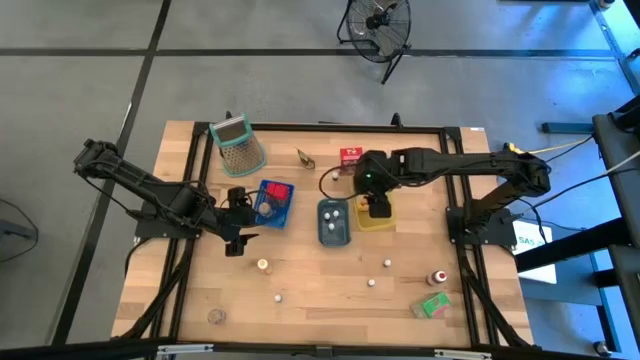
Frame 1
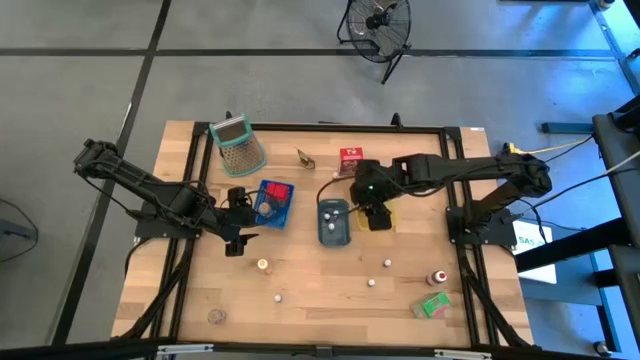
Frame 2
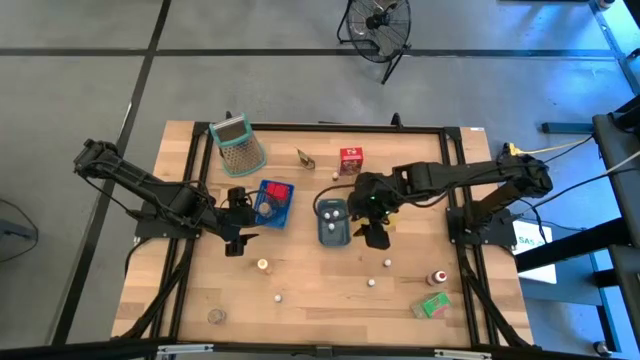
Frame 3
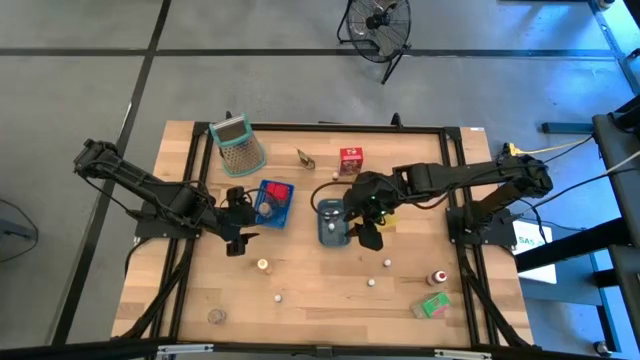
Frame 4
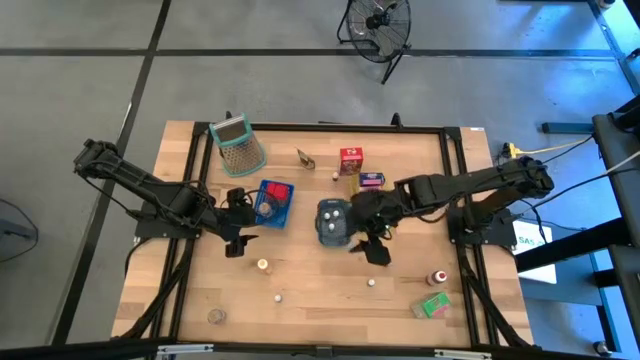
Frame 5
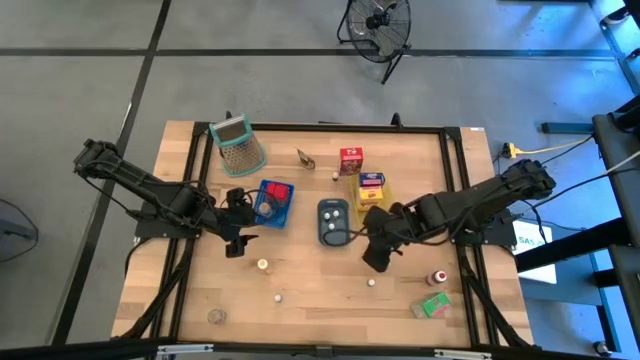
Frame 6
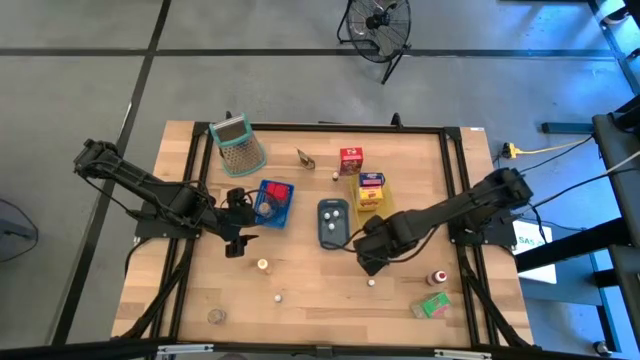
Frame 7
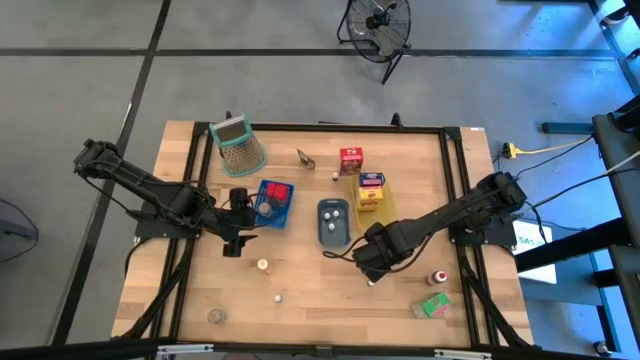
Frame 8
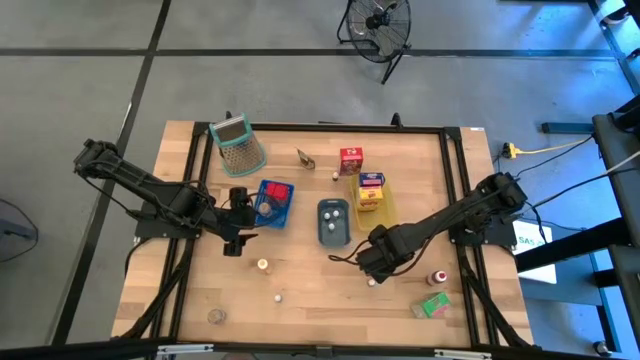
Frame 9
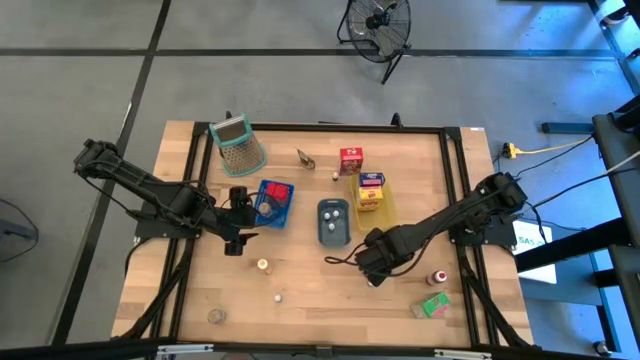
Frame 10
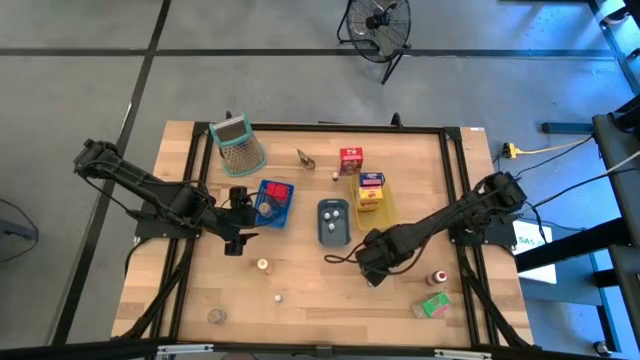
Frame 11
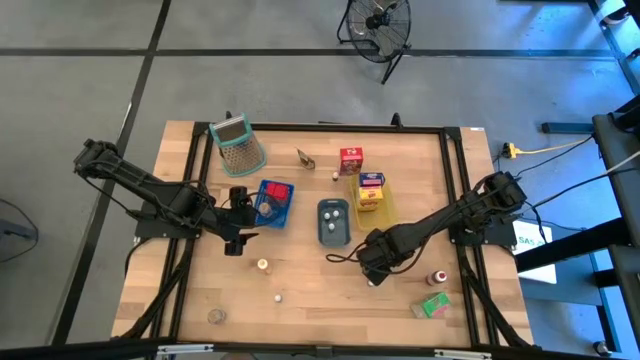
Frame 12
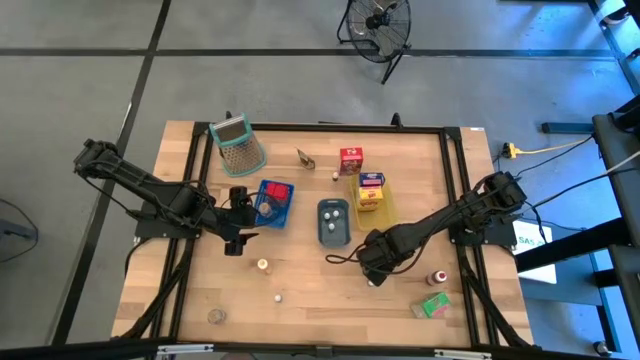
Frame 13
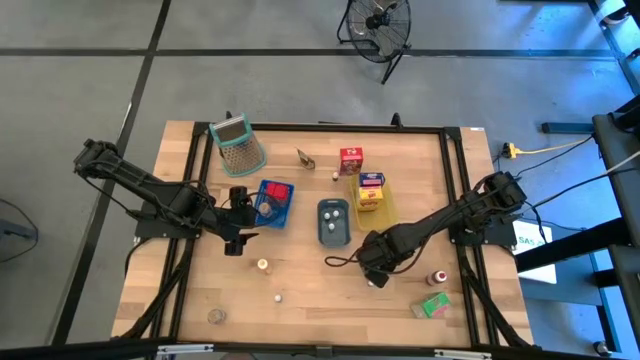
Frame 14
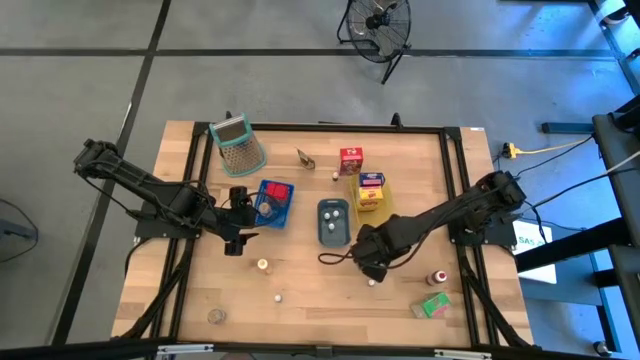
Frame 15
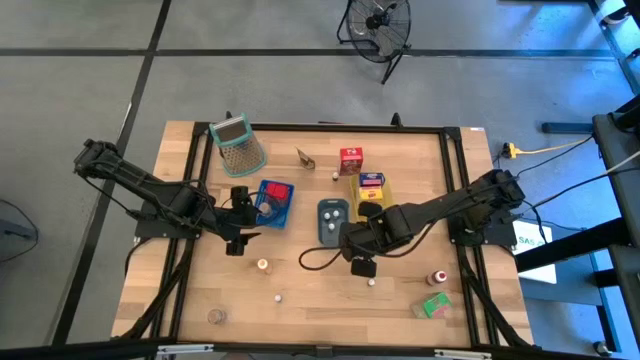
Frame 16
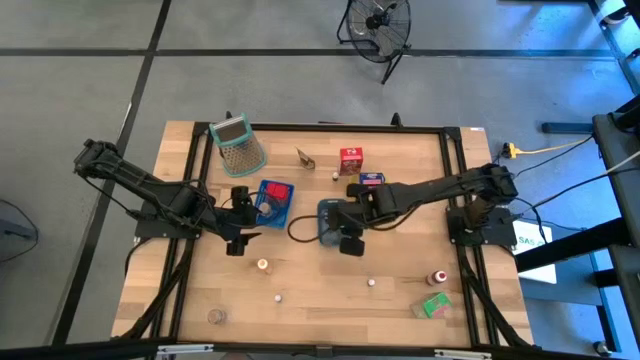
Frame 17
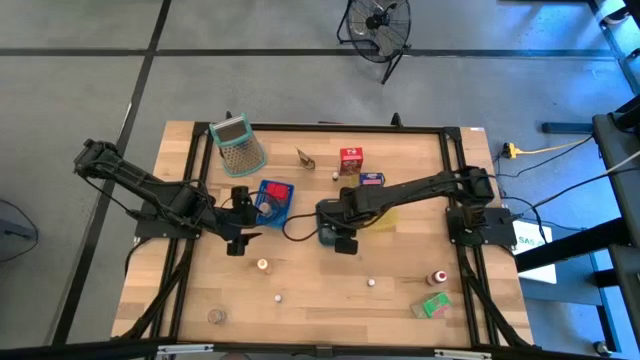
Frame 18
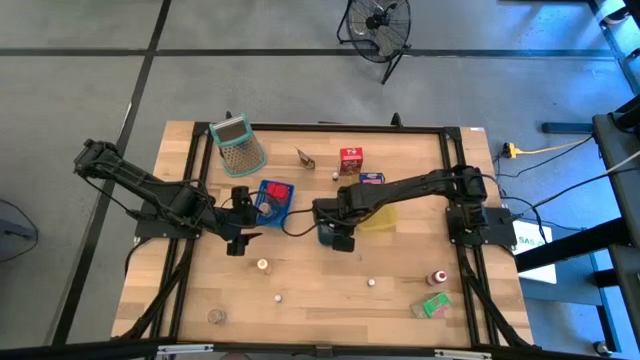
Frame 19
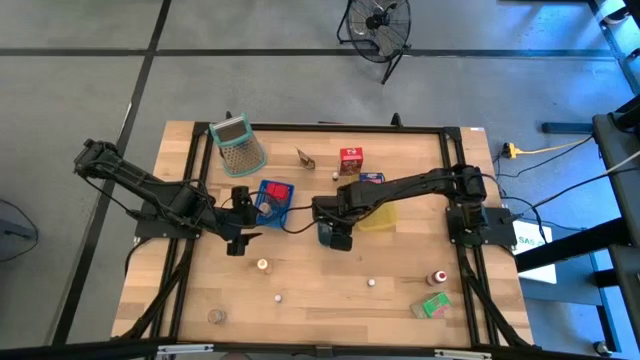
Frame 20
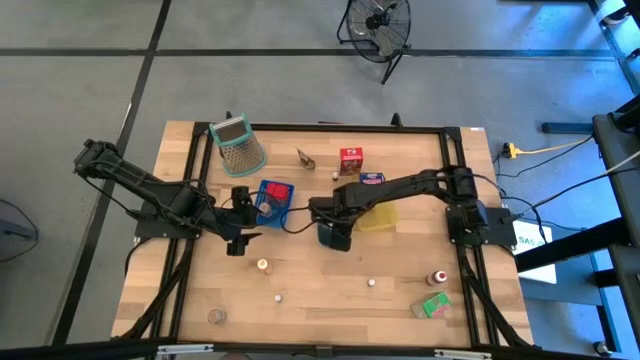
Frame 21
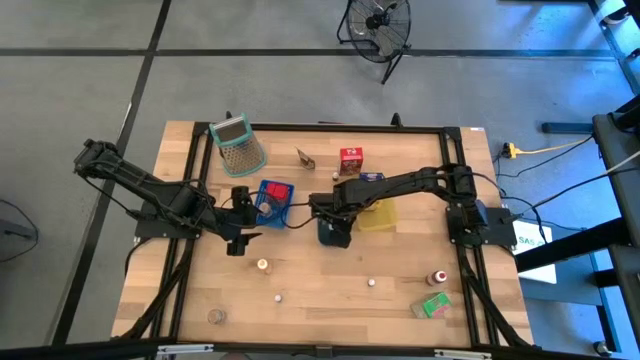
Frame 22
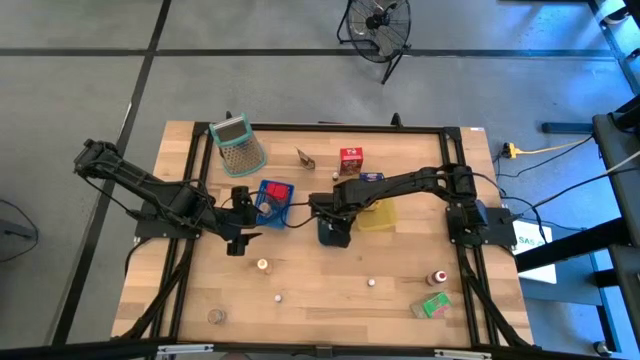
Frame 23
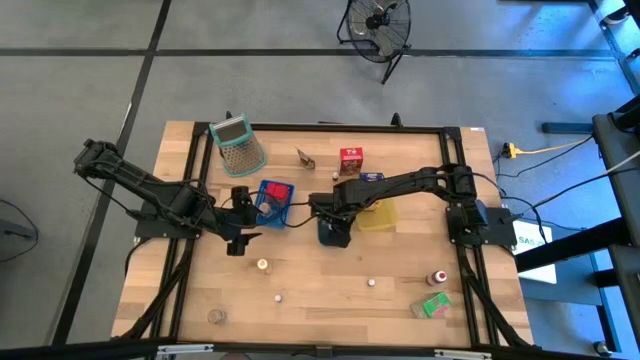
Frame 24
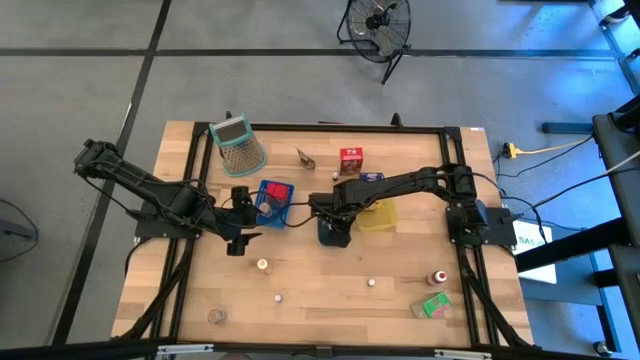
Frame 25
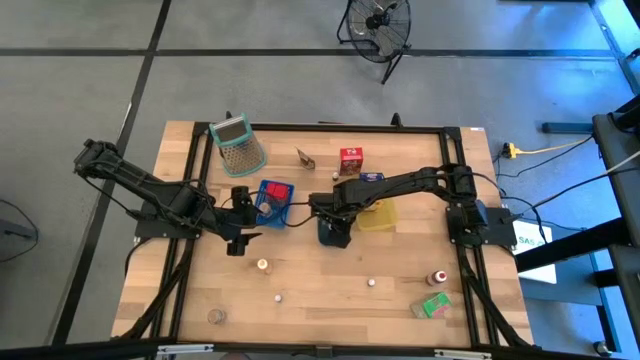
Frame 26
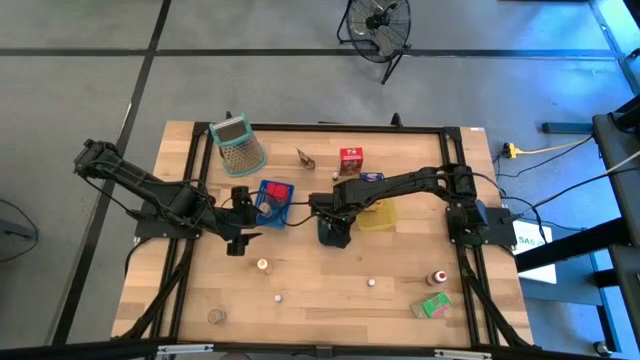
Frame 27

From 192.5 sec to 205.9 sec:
Task: Pick & Place Kitchen Items
Put the small black food coloring into the green bin

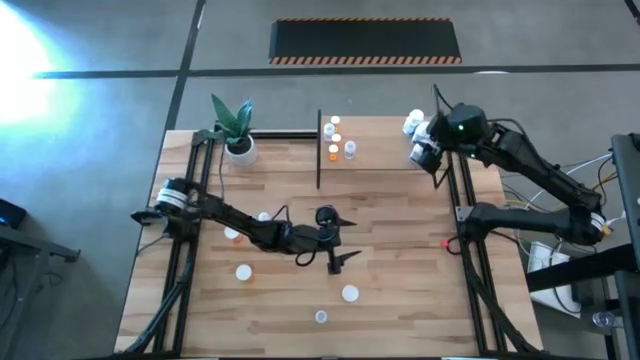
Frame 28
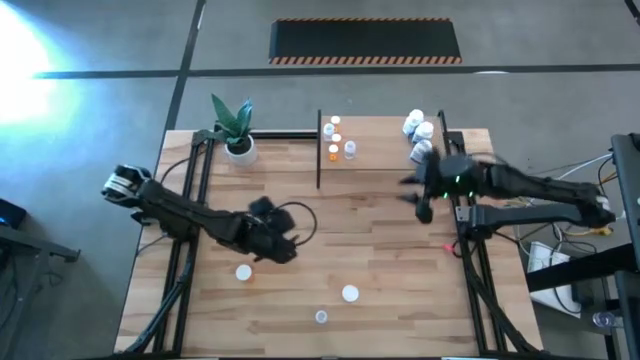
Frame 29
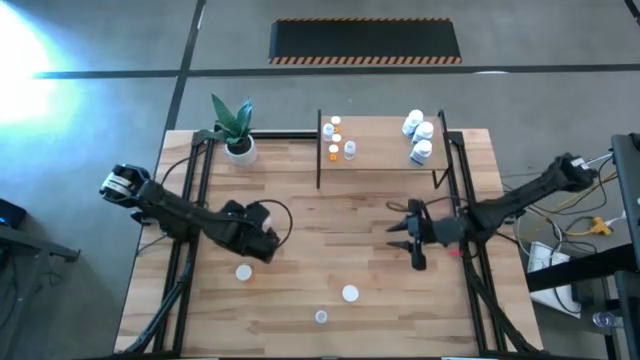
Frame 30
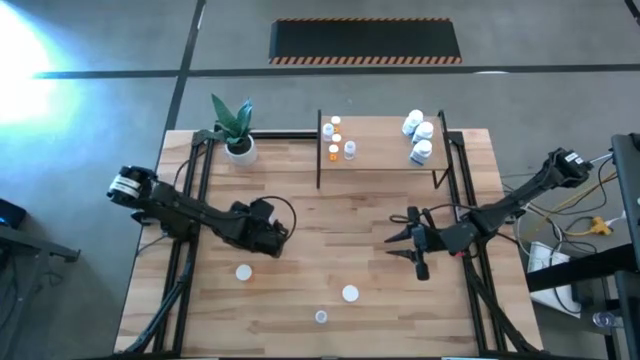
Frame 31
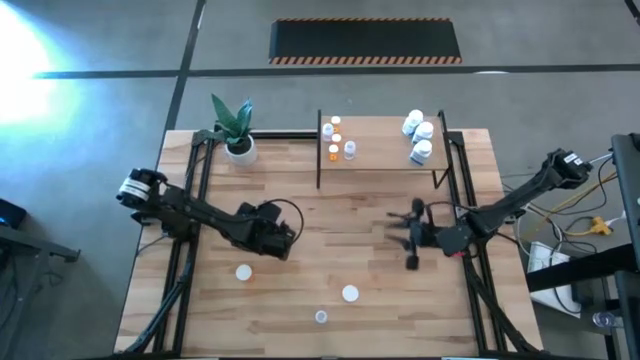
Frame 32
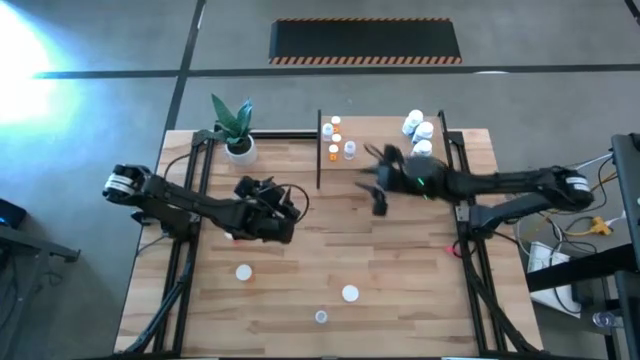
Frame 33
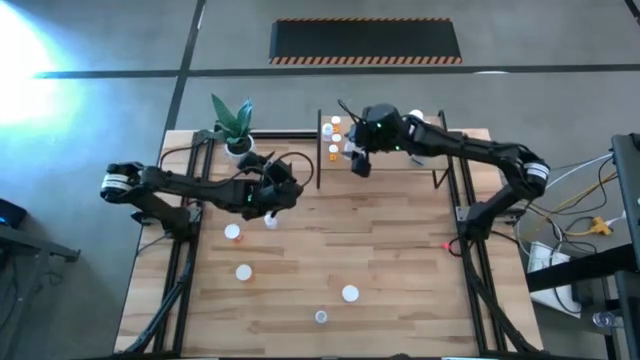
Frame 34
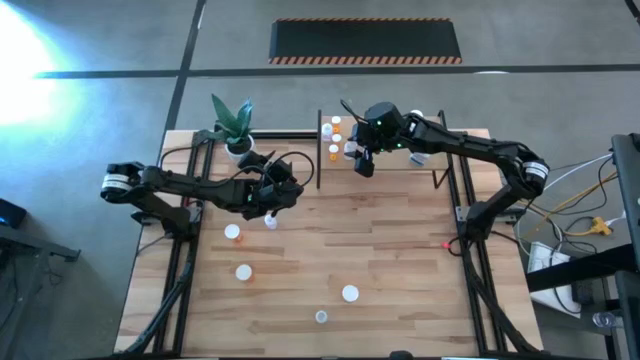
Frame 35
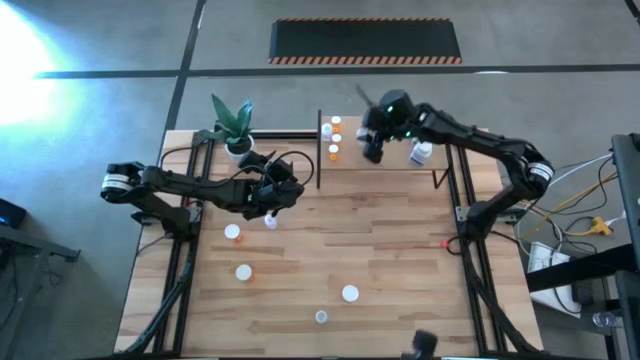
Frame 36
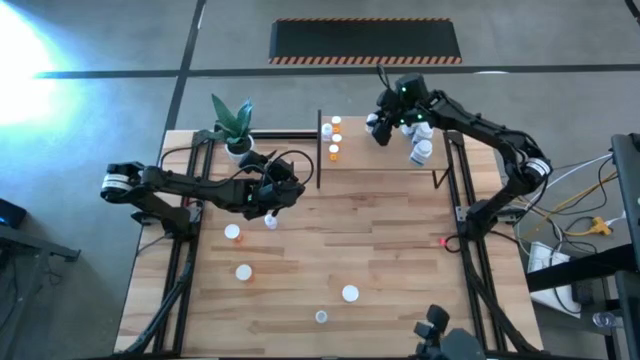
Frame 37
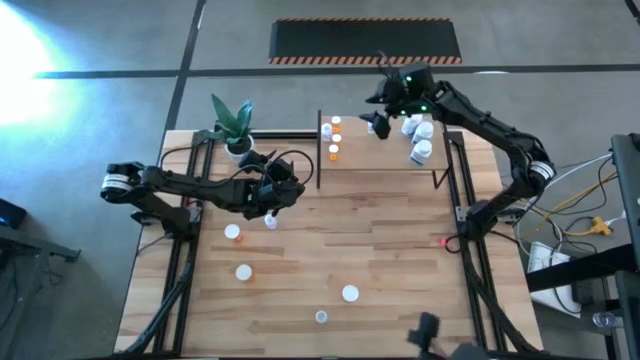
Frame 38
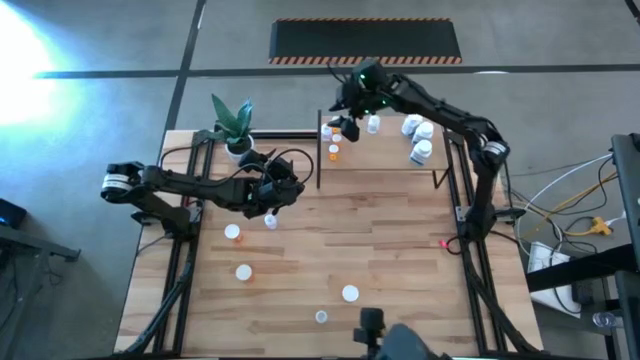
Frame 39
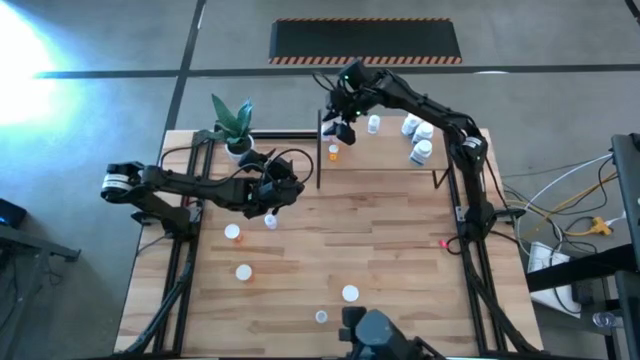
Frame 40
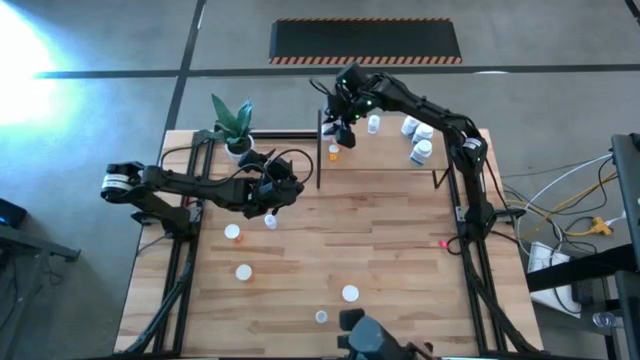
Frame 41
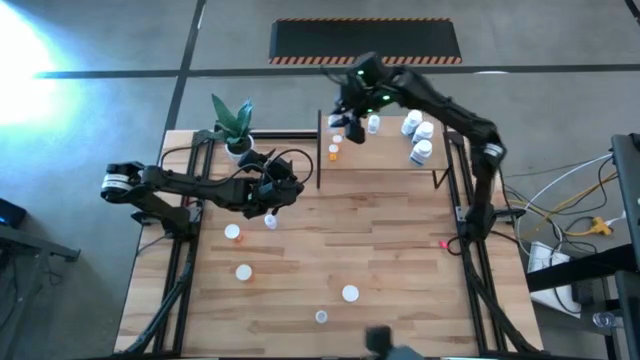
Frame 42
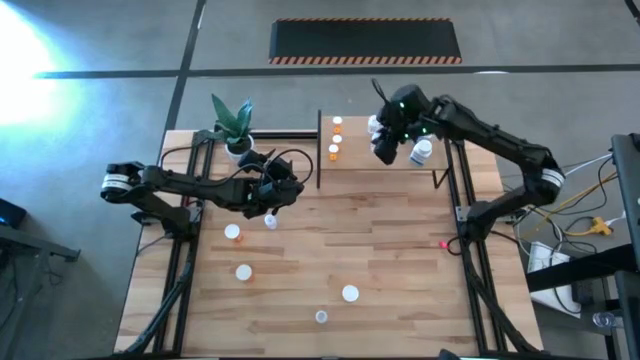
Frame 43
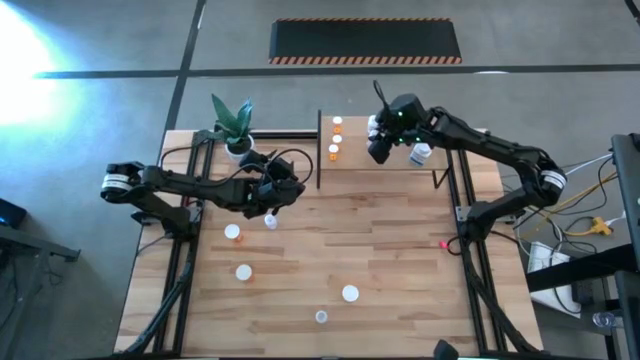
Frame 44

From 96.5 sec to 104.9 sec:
Task: Pick and place medicine bottles onto shelf by color
Adjust the transparent pill bottles on the shelf
